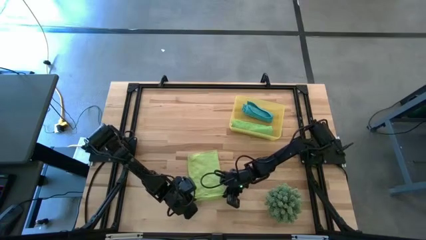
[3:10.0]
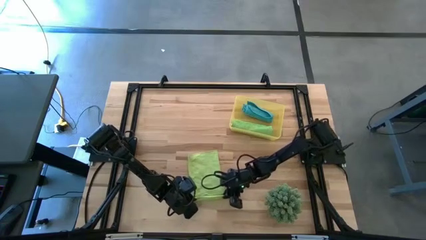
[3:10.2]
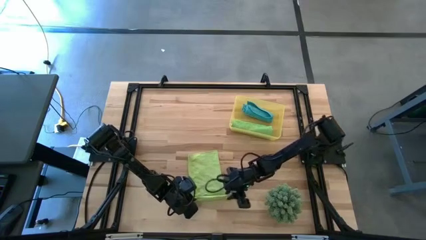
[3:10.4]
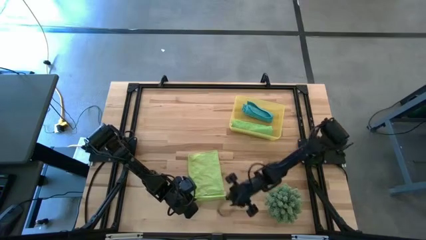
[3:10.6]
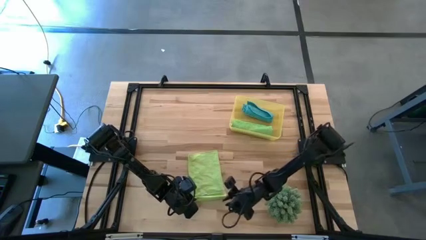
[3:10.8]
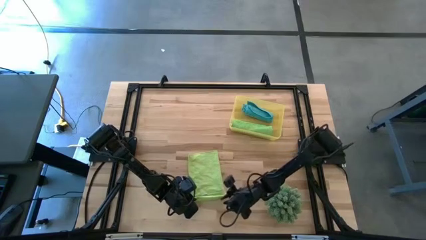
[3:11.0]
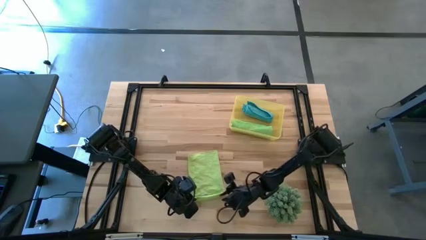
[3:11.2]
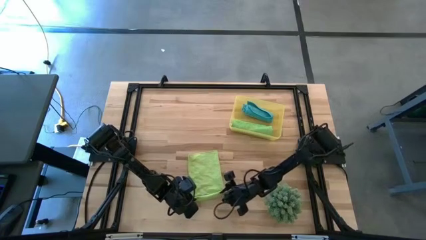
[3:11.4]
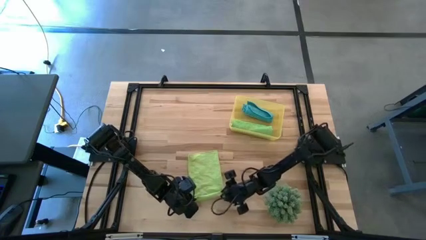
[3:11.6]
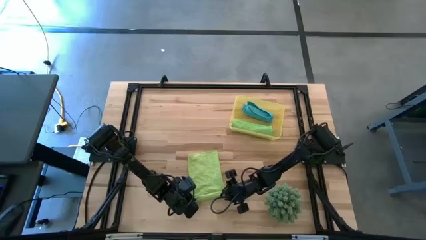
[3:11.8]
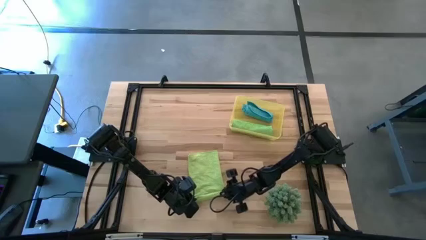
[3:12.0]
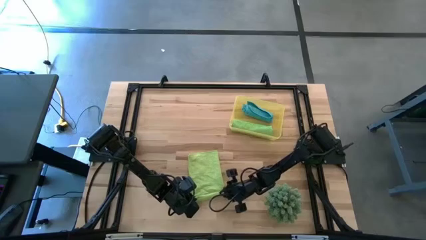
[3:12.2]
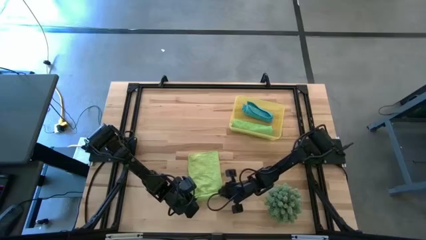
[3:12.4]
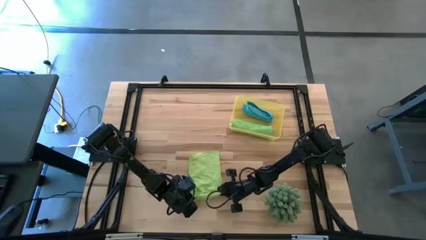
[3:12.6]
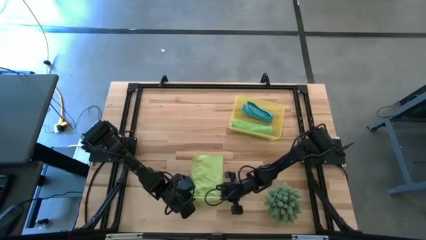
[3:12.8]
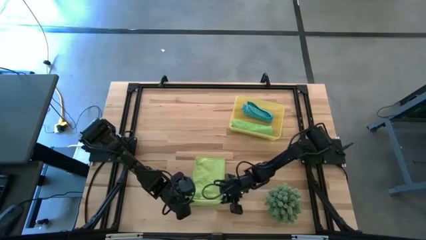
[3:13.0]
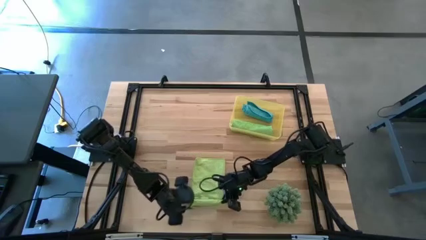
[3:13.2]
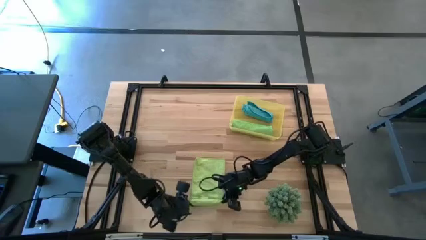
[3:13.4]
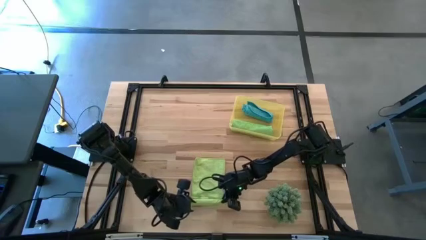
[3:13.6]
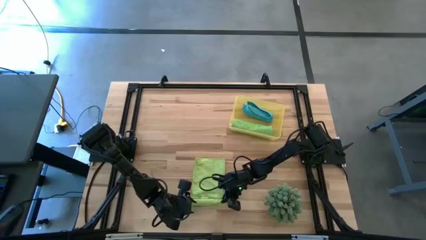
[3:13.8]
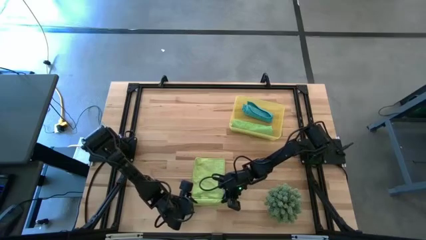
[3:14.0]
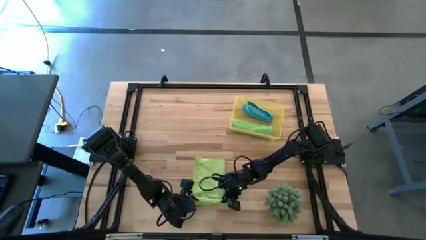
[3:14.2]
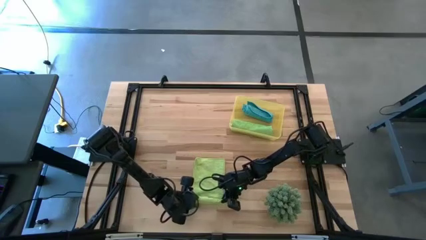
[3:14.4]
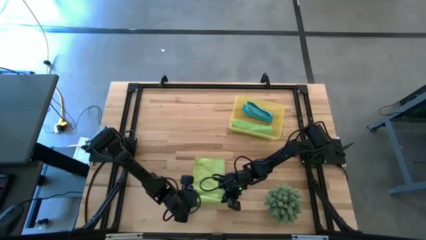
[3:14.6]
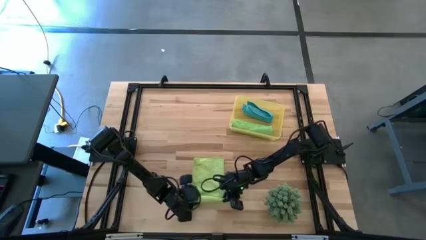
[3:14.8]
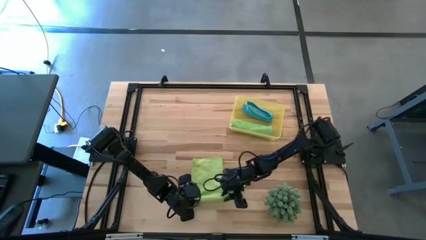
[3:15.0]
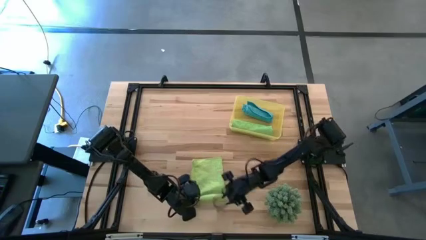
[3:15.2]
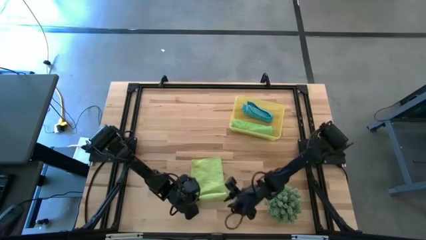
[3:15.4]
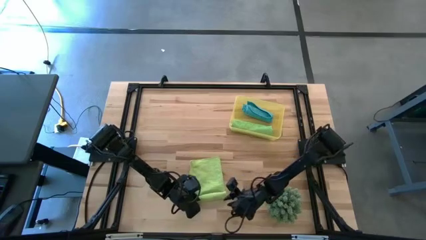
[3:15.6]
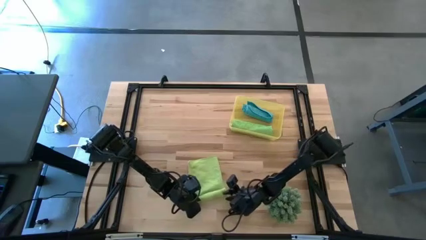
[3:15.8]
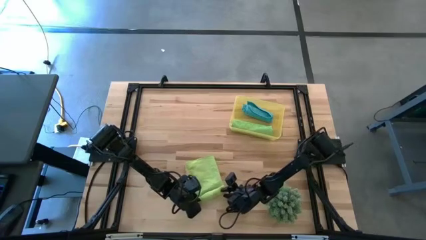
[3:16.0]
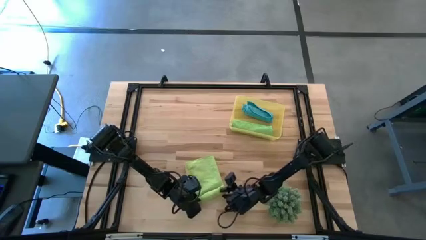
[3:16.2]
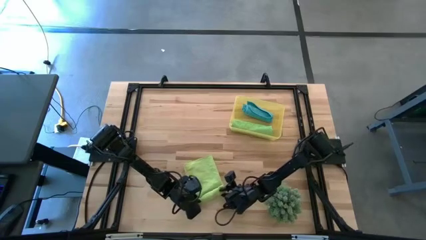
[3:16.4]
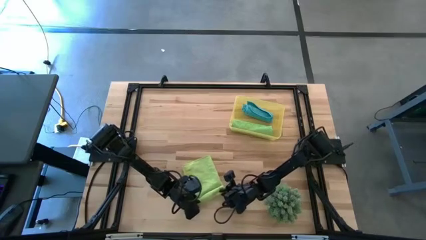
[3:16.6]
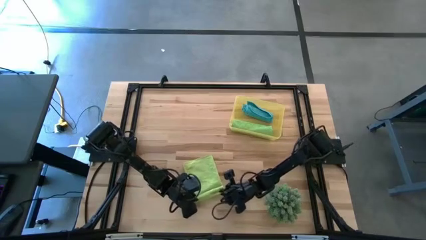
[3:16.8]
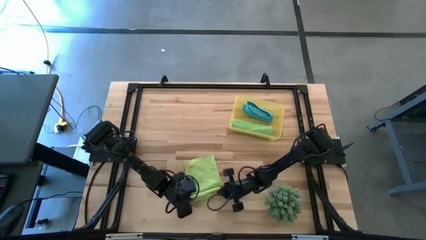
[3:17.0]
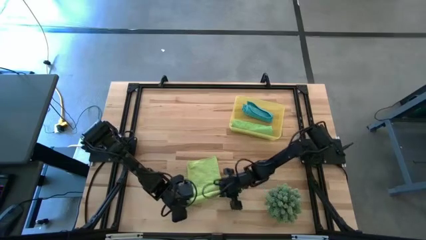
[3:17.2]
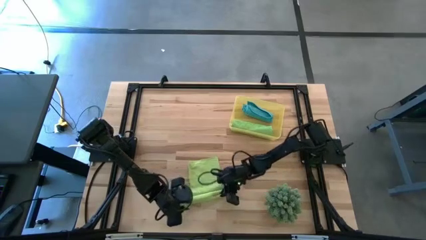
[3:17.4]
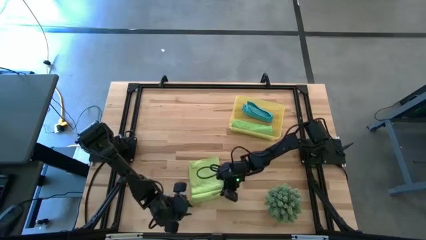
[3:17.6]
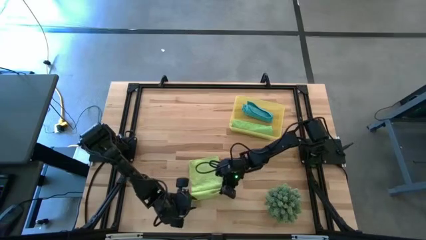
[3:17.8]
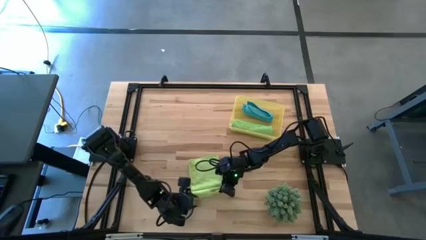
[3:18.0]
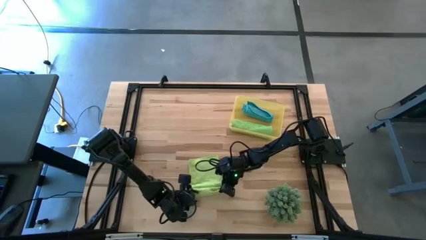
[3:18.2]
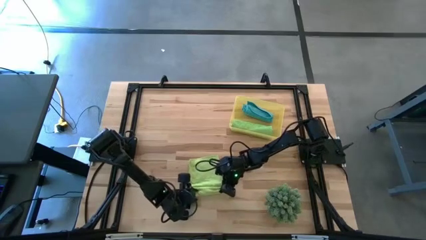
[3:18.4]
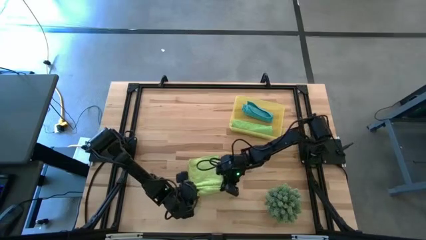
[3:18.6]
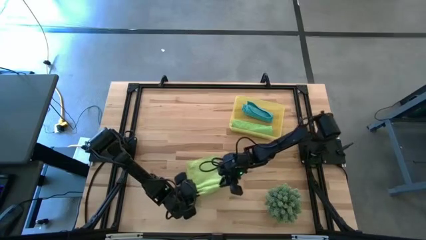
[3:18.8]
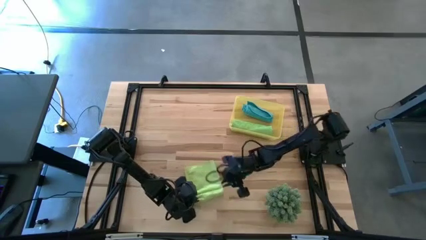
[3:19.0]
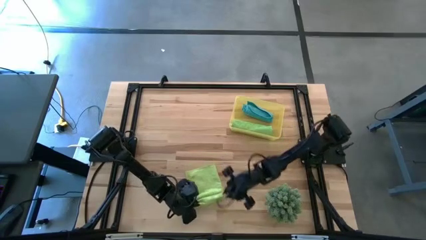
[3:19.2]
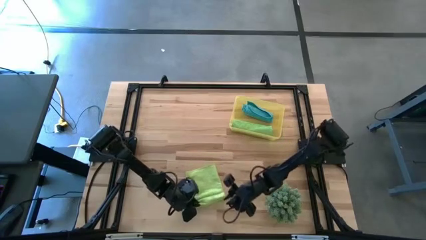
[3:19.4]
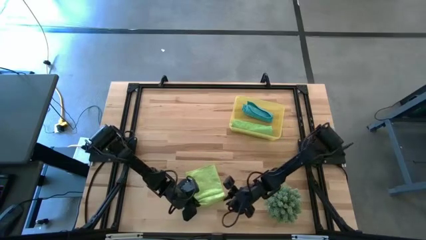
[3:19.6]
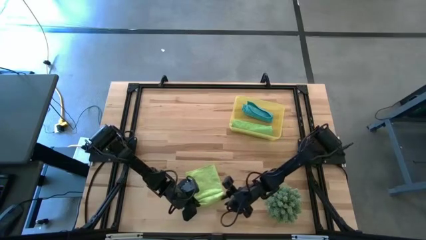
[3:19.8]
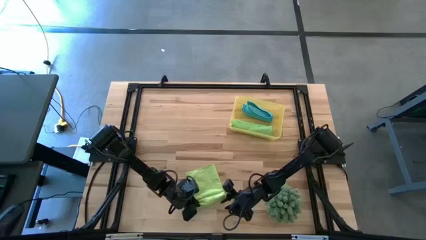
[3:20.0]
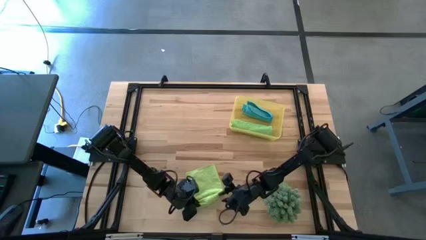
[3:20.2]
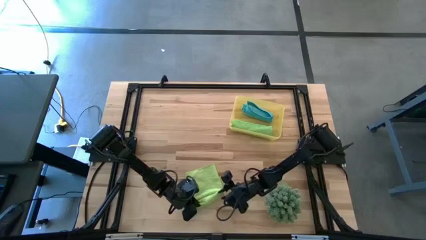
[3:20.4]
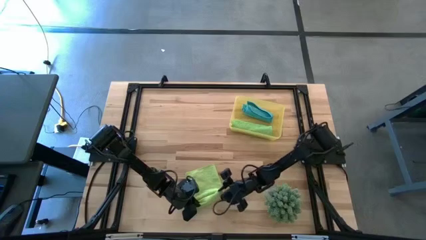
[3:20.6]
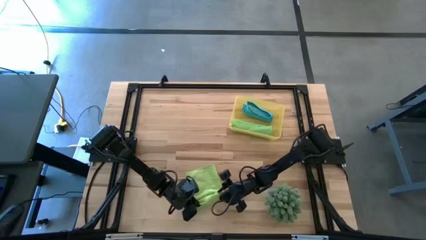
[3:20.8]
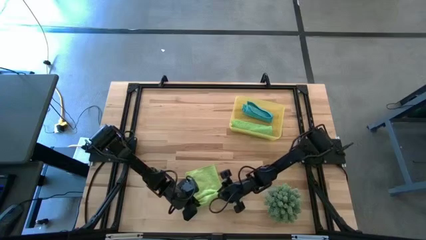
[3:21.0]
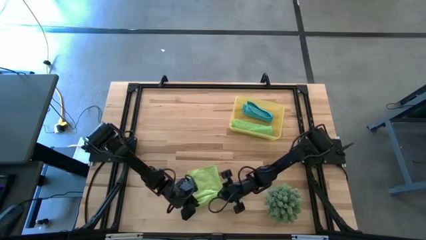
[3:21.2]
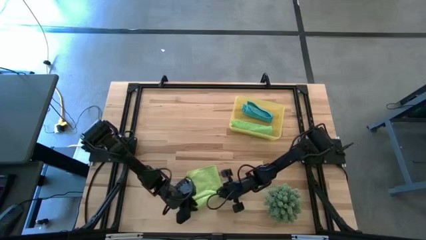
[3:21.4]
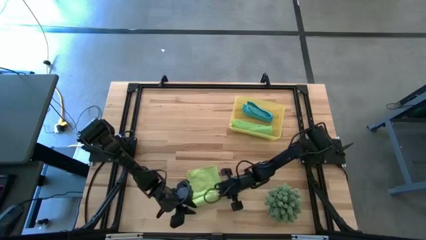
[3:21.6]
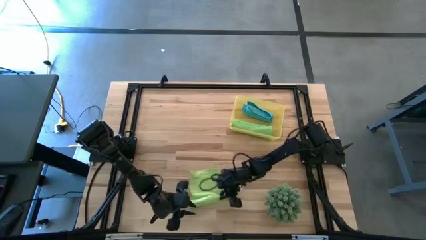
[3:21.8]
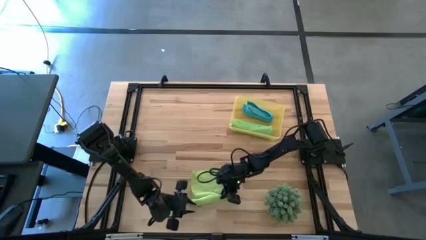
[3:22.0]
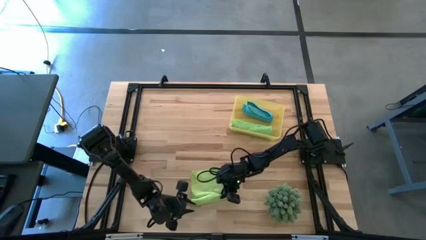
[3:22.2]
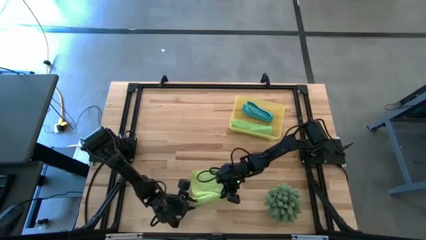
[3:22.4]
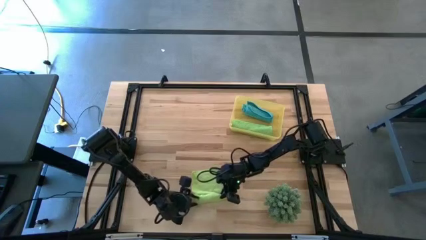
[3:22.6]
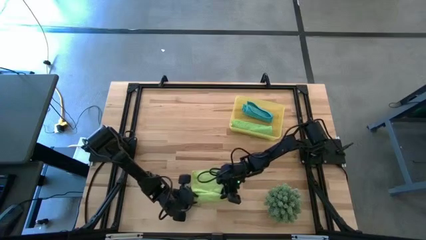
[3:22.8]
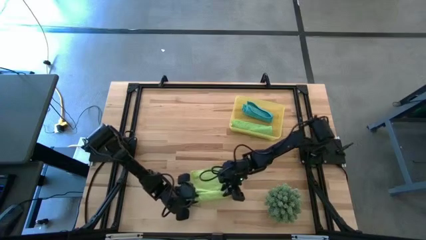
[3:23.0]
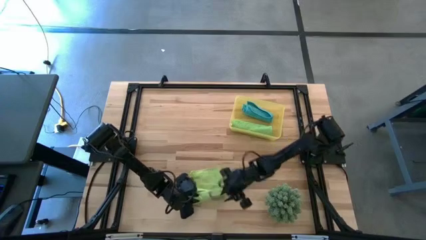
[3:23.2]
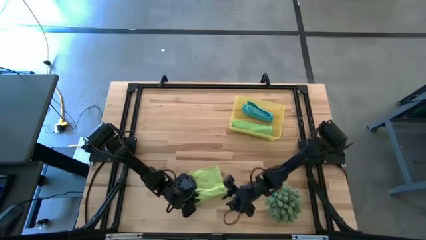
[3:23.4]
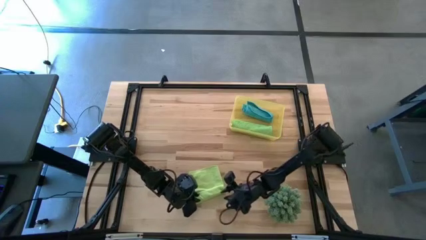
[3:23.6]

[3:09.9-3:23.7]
Task: Roll microfiber towels into tight, uniform cylinder then place into a basket
Roll the green microfiber towel

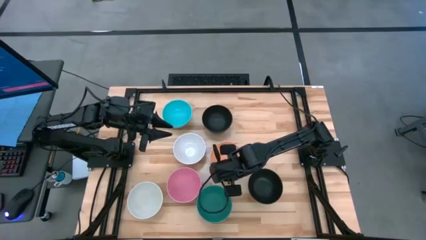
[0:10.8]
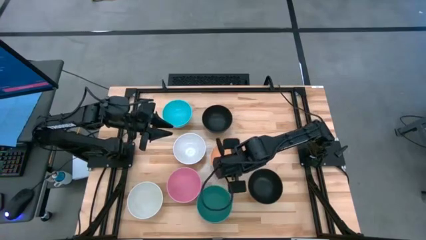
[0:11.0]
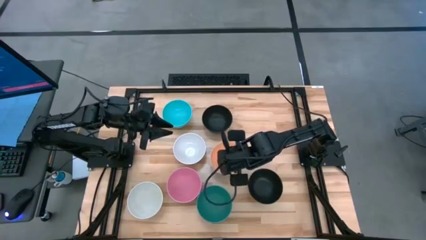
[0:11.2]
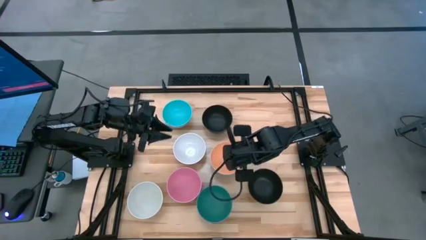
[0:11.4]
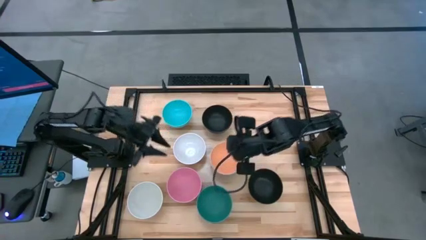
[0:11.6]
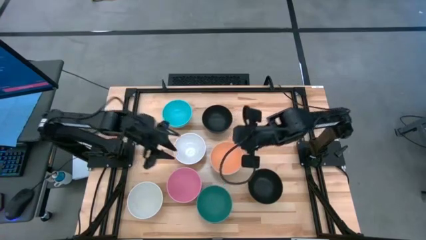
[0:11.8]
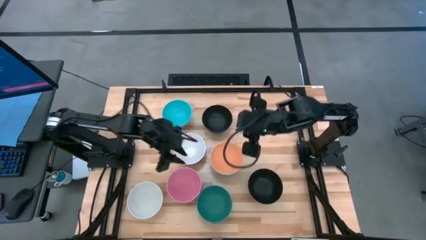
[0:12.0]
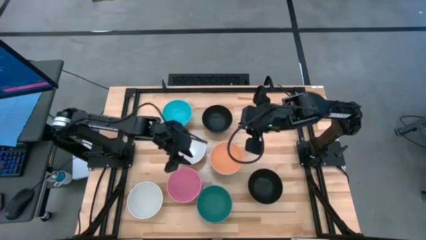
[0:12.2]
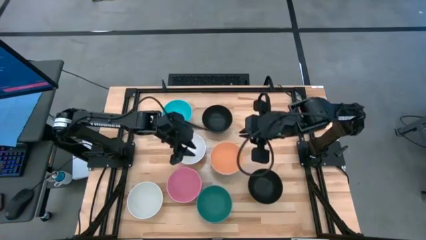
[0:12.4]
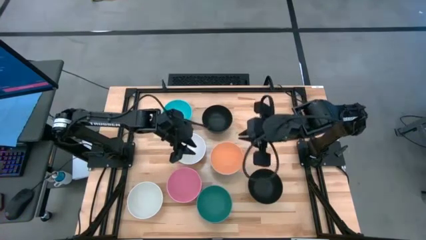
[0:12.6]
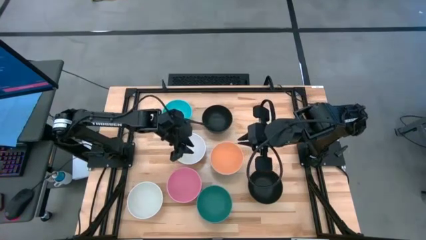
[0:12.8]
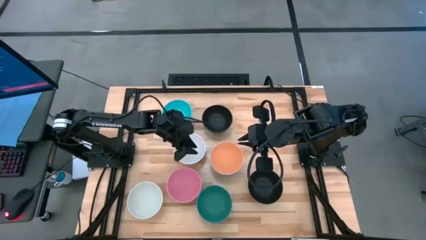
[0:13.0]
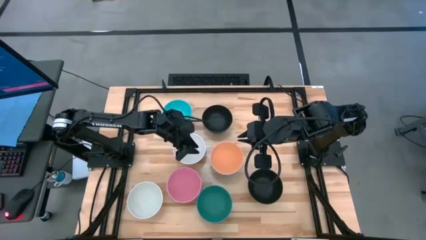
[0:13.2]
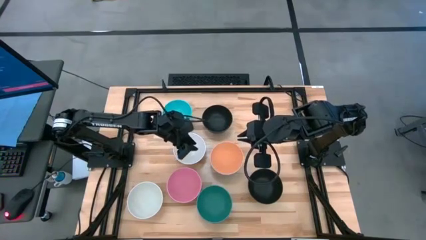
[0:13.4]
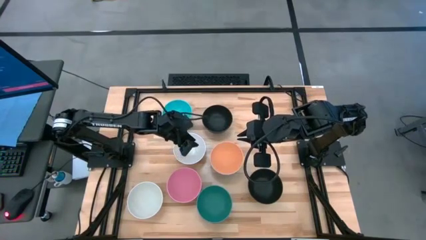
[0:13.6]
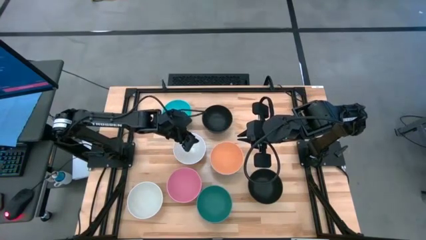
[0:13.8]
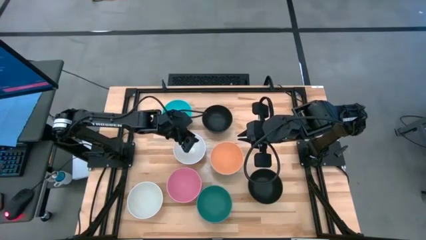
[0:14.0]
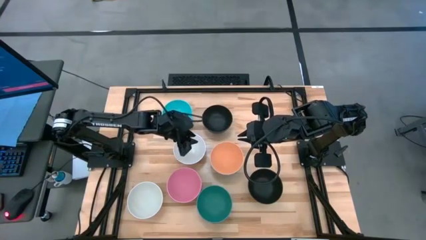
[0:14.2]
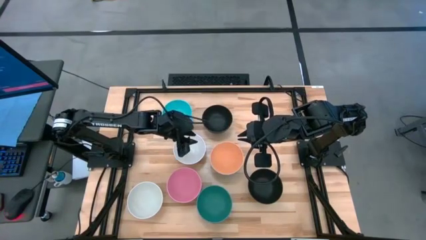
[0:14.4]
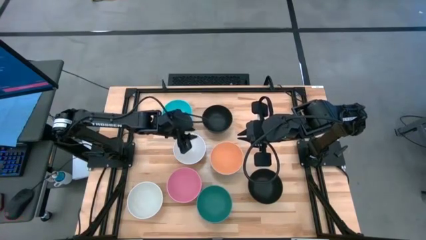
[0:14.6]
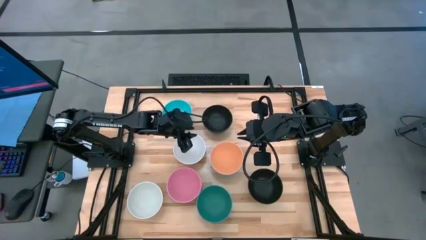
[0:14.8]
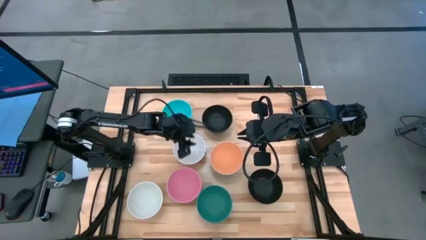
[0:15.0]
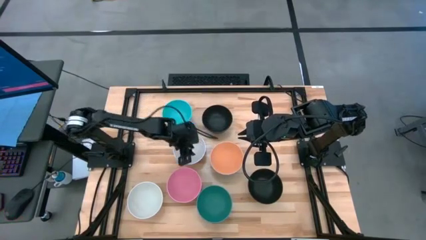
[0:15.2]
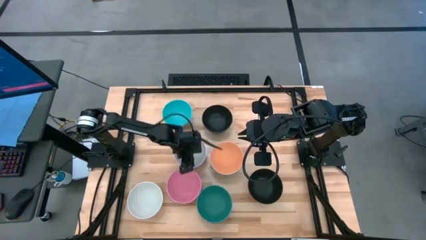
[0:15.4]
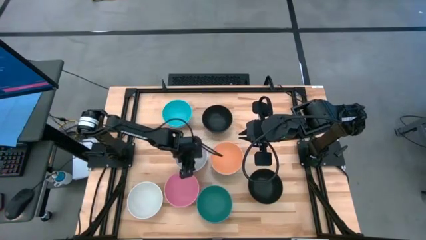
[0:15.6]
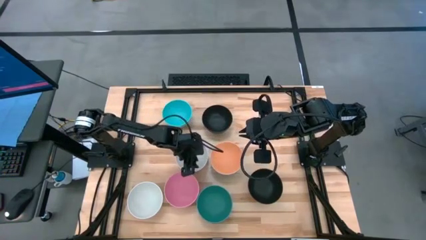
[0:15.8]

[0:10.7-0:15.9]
Task: Nest bowls inside each other
Stack the white bowl on top of the orange bowl
